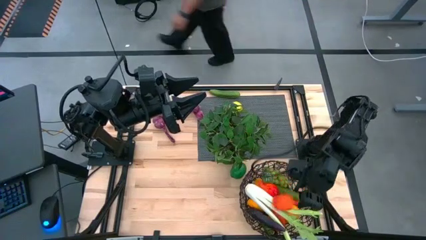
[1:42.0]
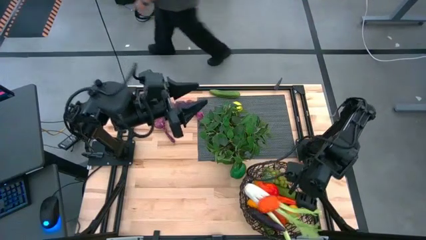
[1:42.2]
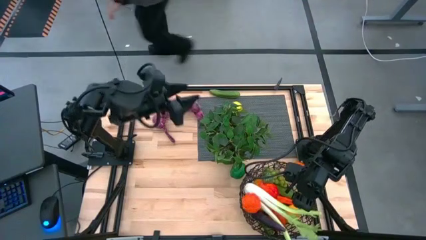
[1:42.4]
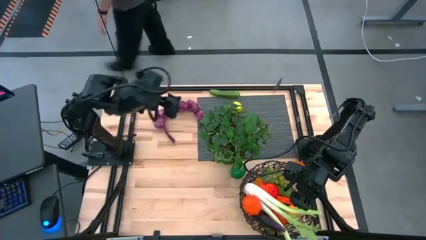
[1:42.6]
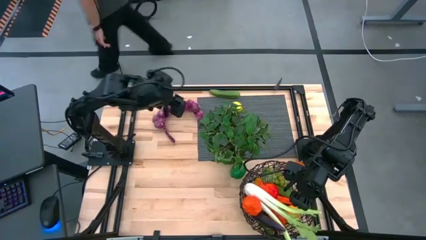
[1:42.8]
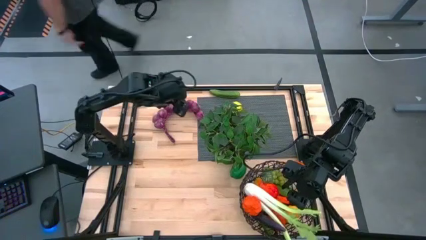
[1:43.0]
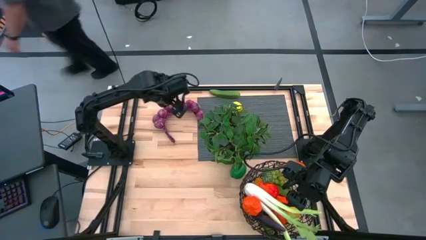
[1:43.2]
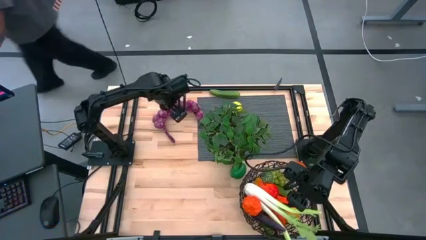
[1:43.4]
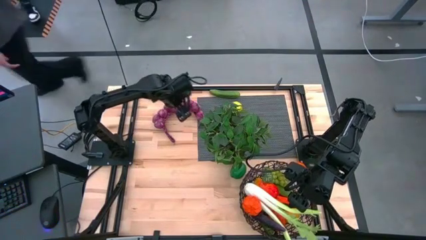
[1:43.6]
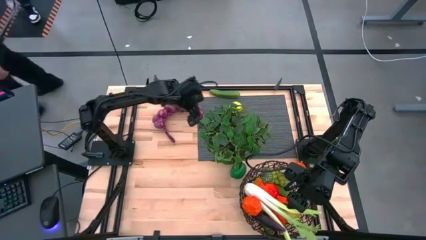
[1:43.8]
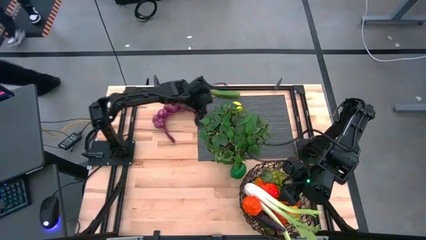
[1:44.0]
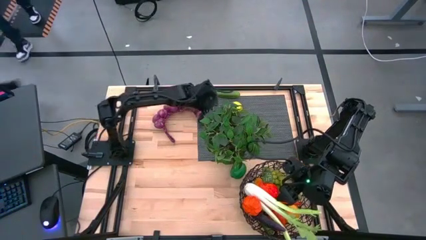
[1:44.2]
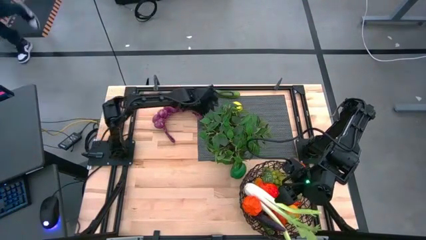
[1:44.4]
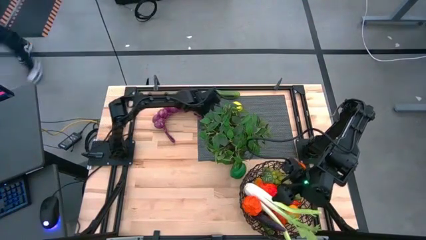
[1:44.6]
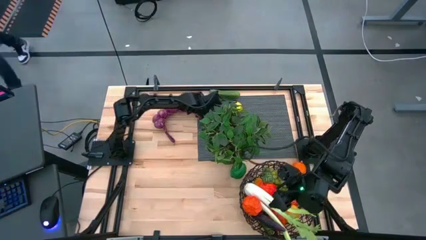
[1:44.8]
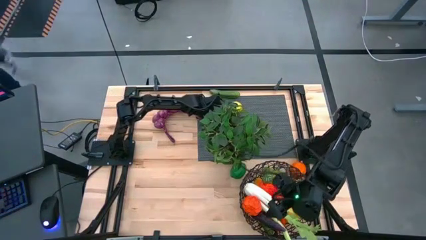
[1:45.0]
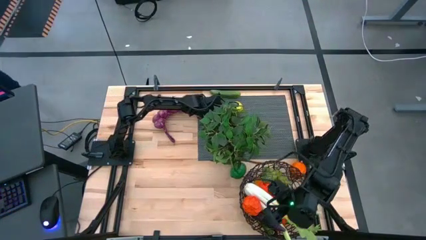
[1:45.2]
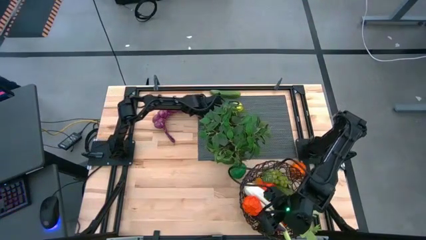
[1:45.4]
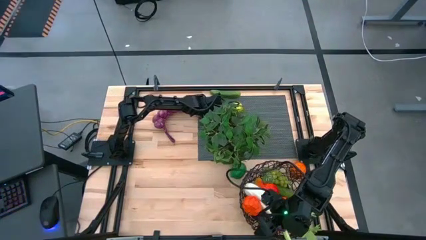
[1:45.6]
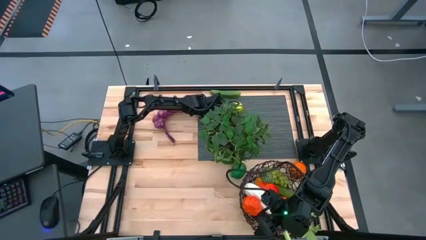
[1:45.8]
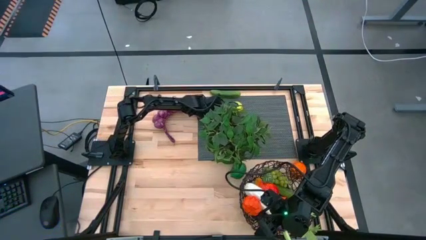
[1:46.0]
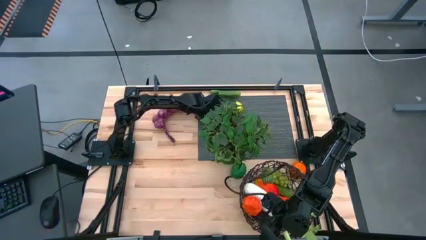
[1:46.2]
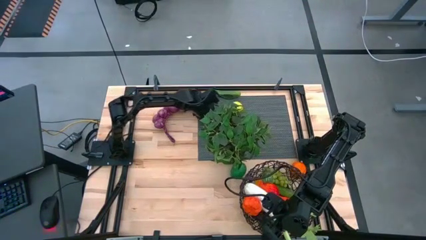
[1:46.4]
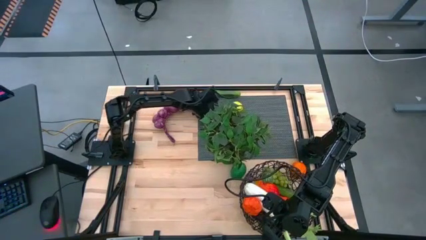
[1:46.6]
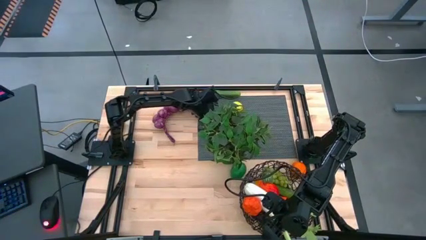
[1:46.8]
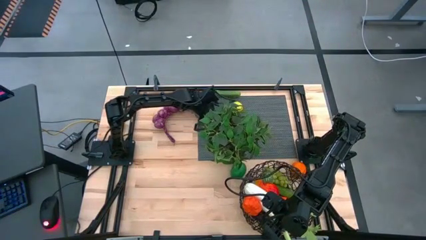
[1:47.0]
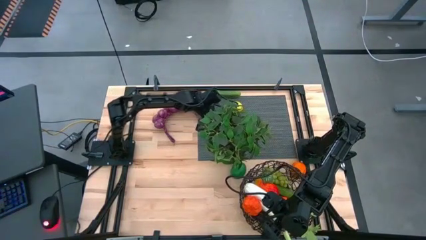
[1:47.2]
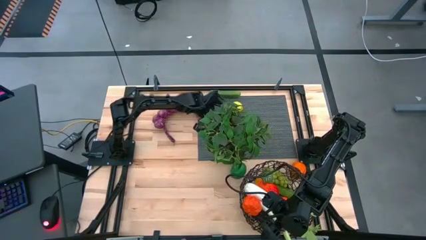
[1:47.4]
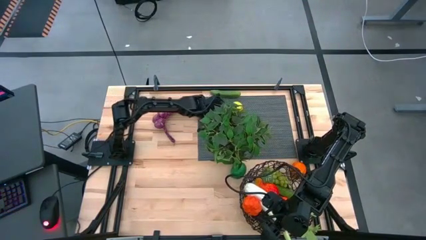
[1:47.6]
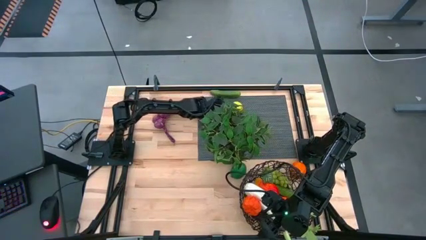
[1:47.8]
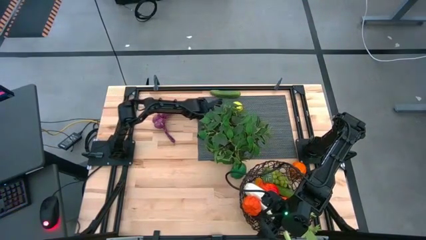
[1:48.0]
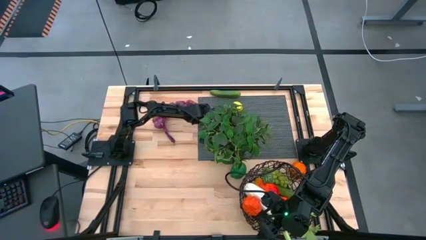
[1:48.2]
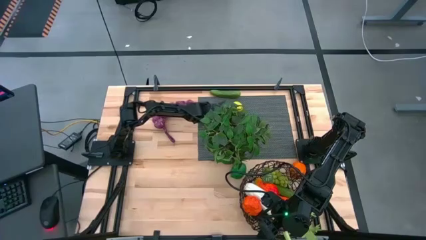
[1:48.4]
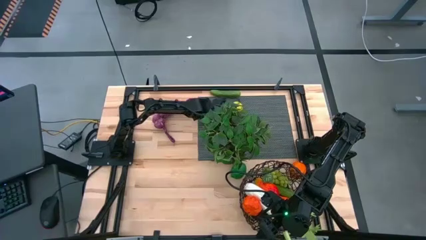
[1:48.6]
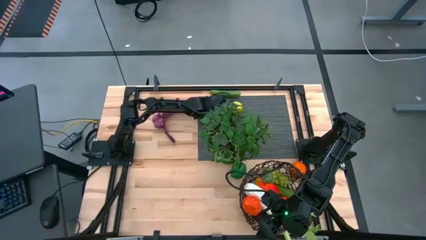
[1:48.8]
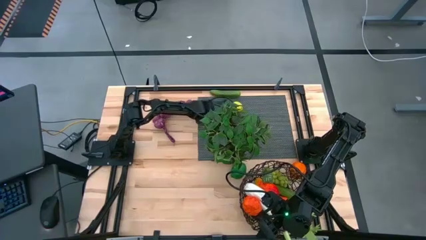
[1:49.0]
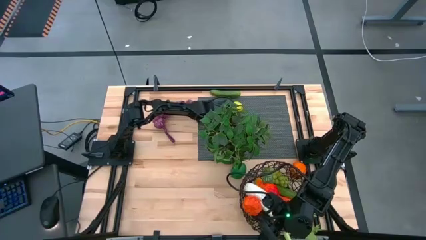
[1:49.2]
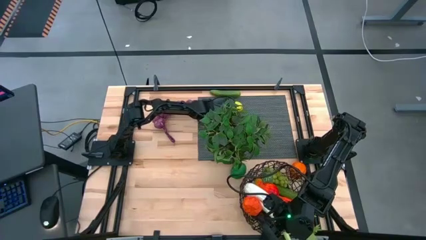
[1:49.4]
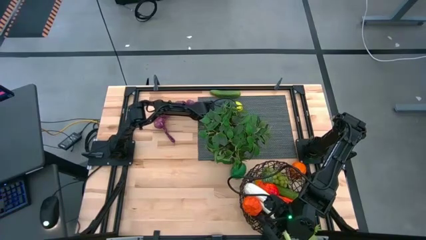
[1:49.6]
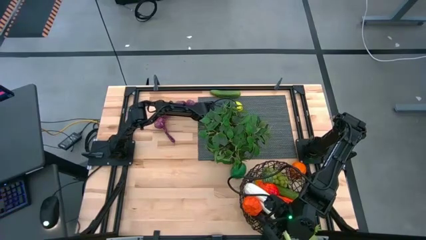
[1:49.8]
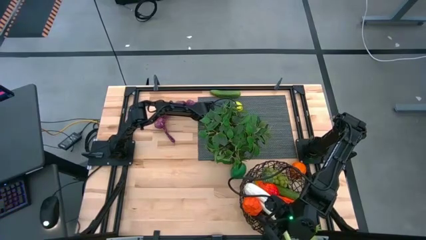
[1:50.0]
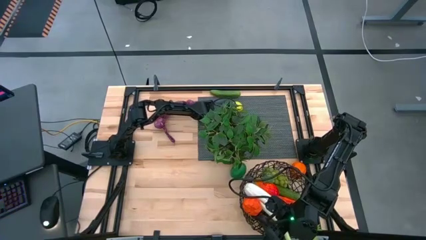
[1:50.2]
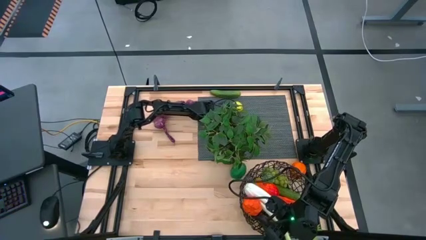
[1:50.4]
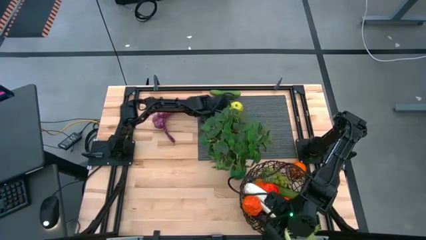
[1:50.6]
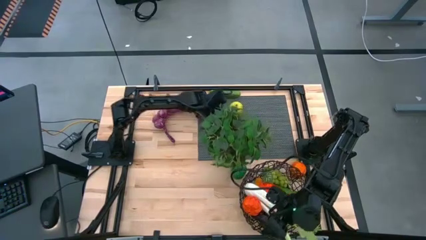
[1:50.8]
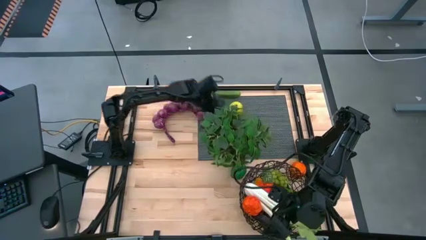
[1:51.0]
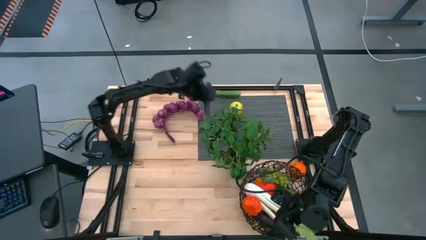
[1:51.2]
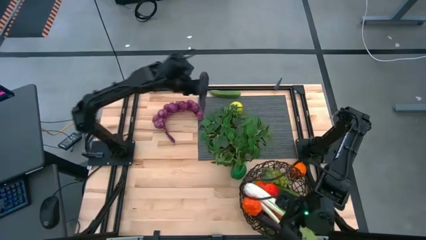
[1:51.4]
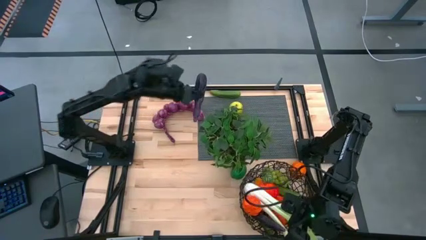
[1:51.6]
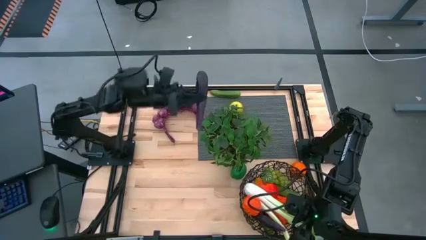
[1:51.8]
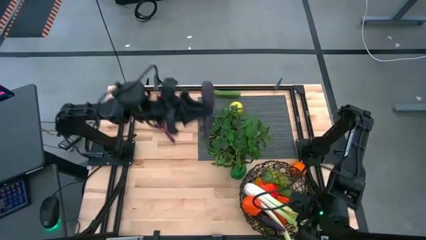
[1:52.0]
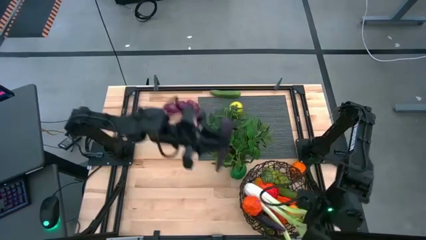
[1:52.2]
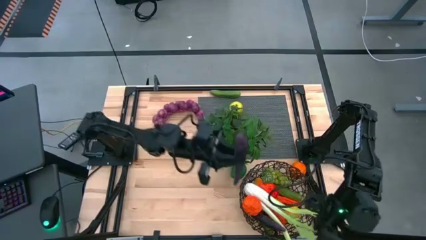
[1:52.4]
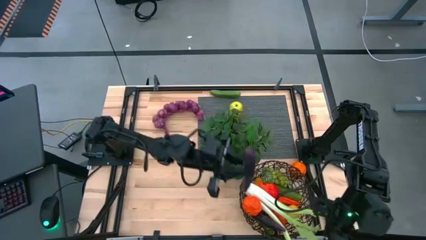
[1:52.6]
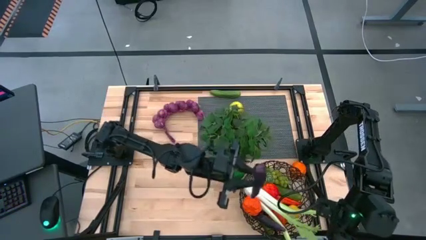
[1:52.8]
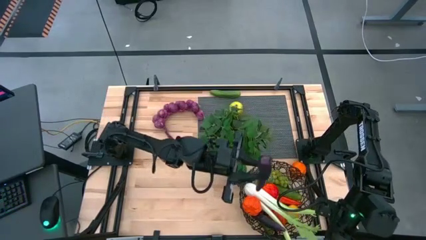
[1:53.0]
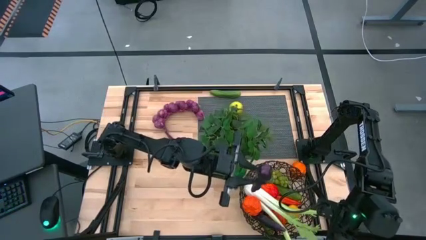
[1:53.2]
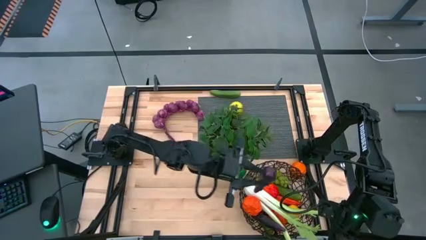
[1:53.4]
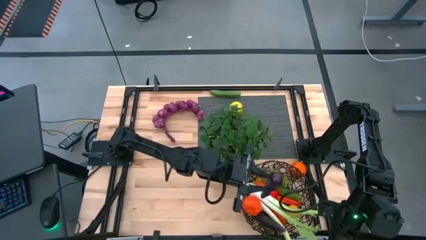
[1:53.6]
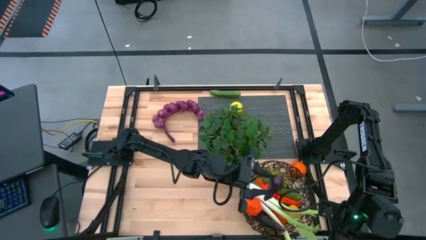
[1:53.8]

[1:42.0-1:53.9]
Task: Build produce basket
Put the purple eggplant into the brown wire basket

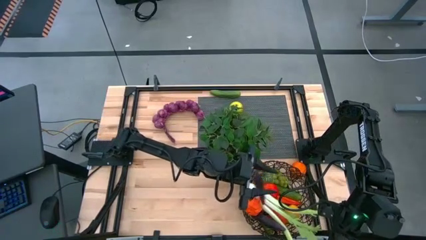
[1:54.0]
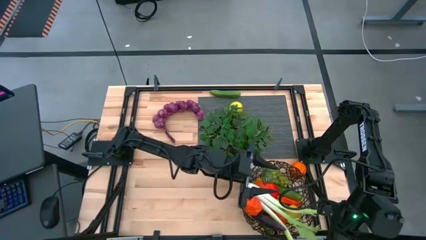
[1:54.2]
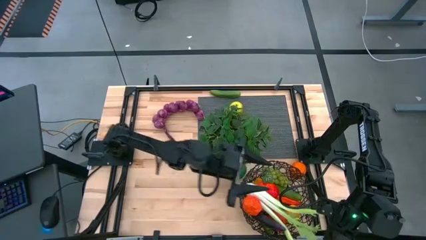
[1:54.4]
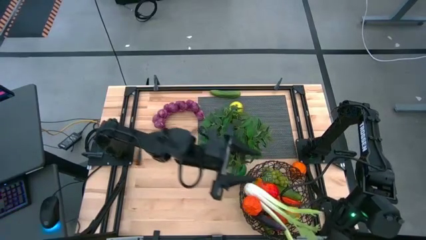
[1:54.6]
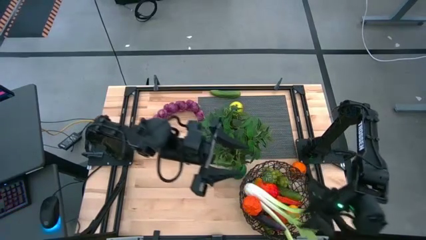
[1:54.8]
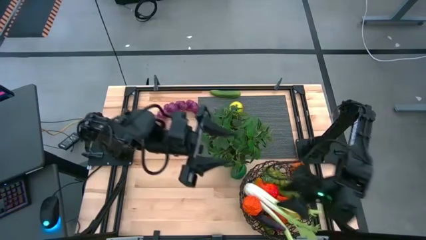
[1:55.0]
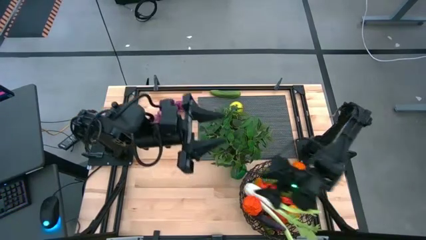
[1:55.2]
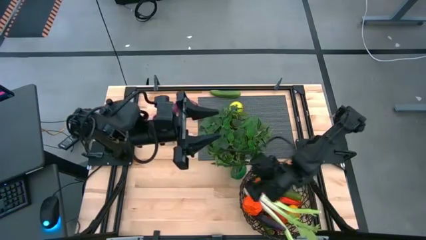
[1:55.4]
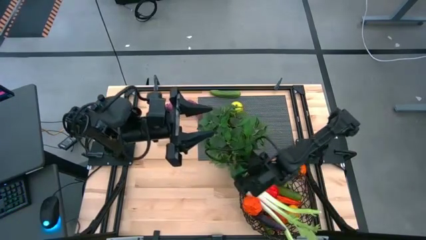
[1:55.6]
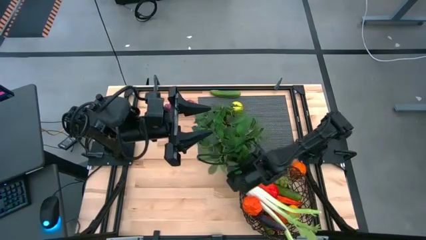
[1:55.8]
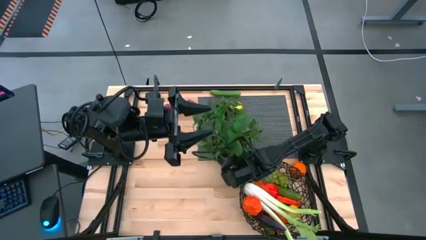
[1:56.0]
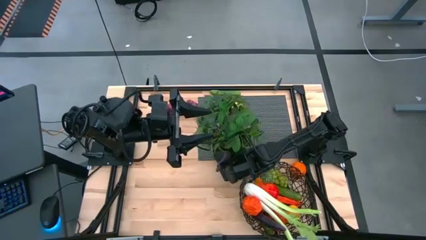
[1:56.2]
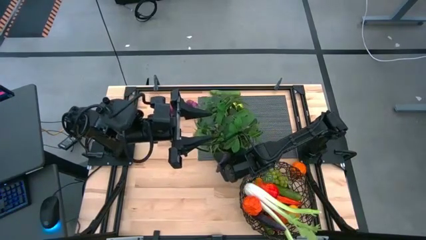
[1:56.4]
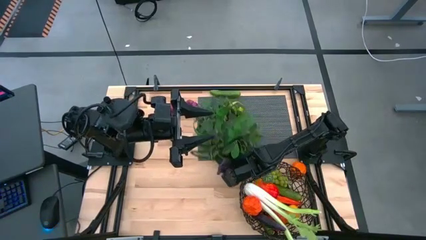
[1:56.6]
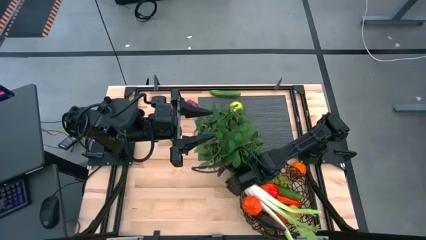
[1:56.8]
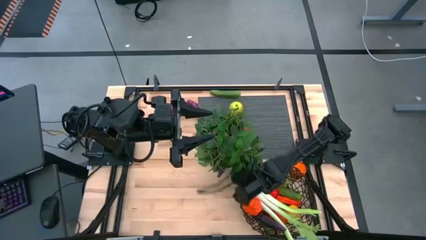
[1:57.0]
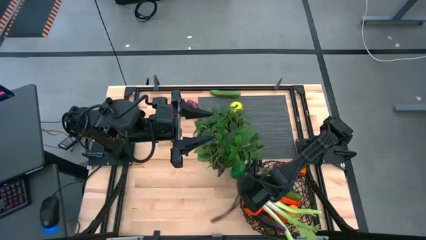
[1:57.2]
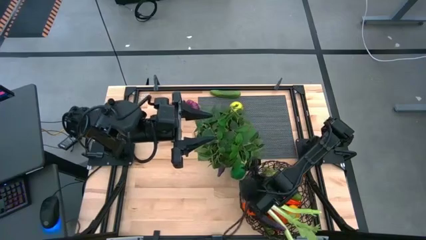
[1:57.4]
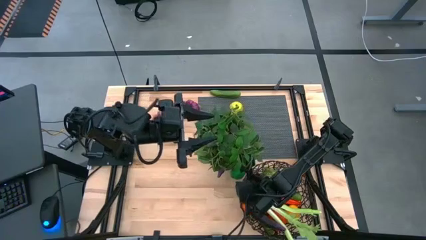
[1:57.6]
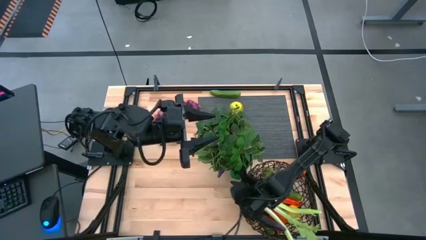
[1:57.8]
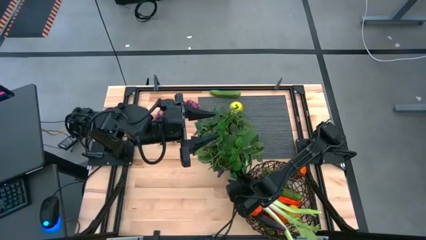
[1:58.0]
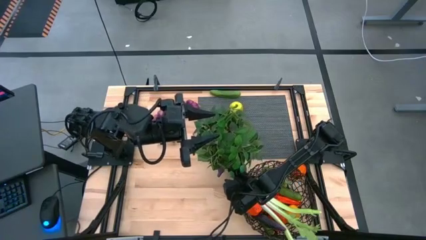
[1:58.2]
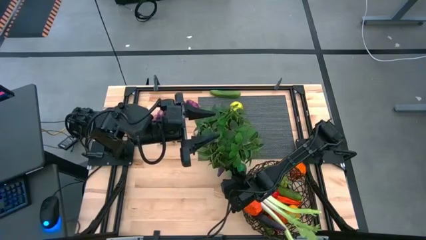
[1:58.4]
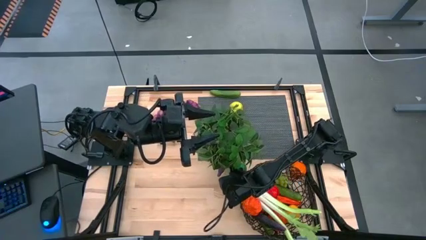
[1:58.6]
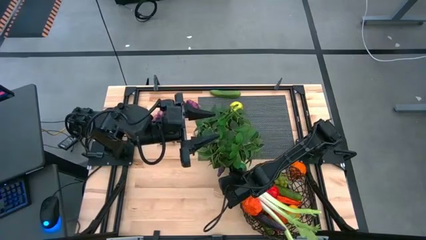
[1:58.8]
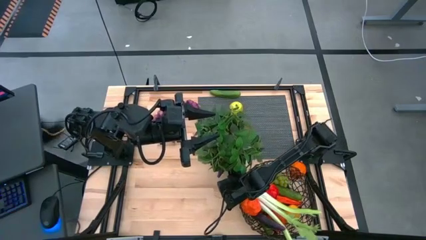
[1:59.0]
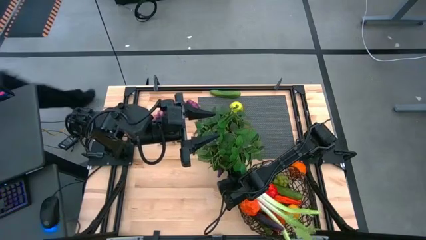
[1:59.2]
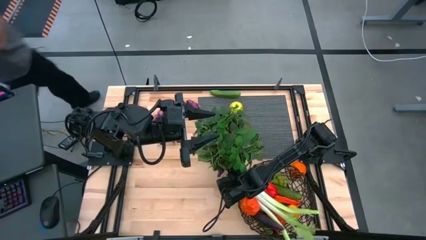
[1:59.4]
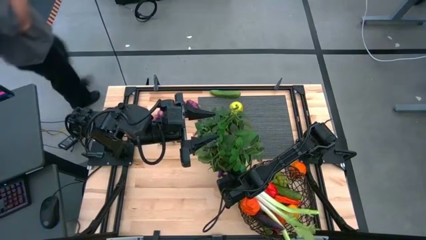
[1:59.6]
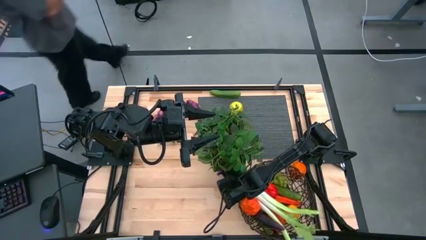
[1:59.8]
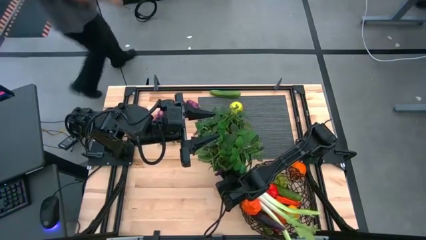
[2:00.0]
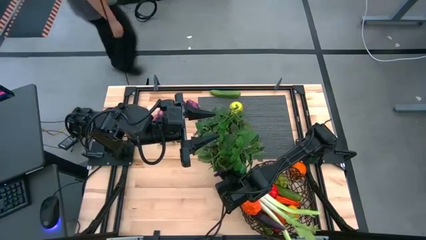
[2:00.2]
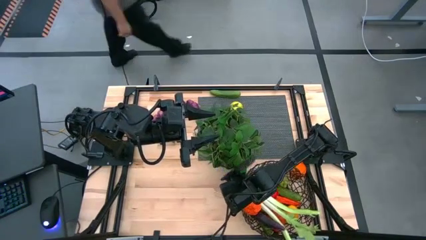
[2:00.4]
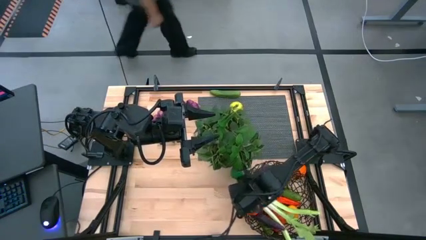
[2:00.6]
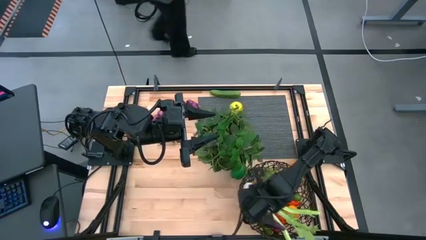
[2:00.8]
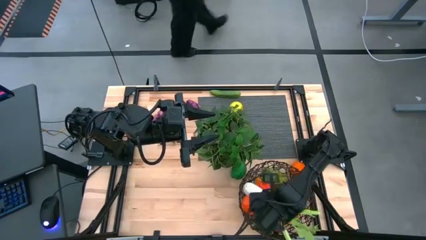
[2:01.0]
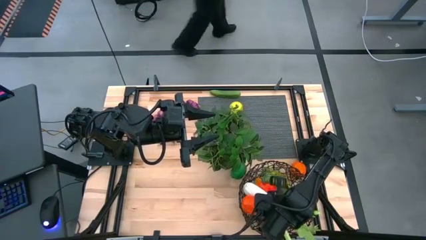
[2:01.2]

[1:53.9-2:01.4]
Put the purple eggplant into the brown wire basket
